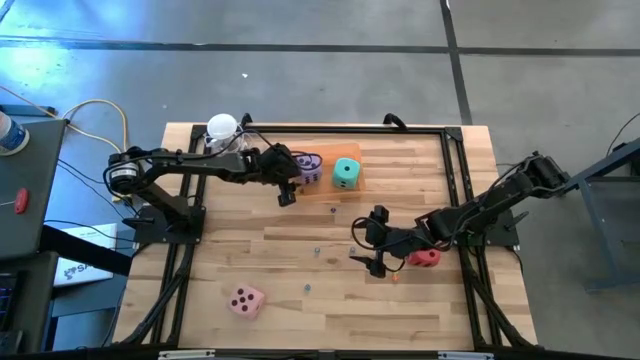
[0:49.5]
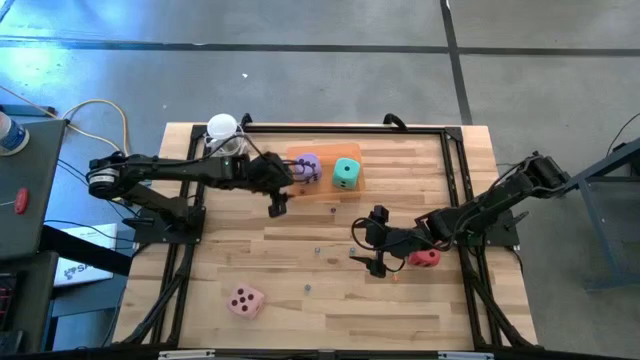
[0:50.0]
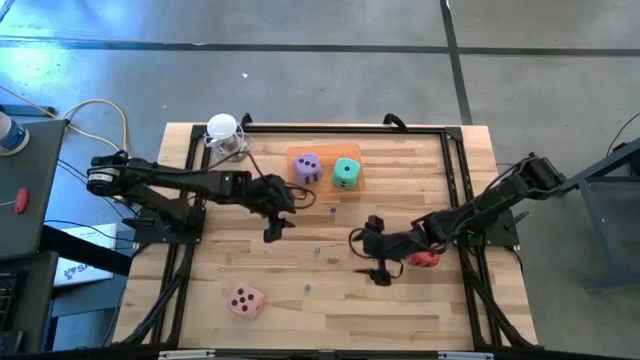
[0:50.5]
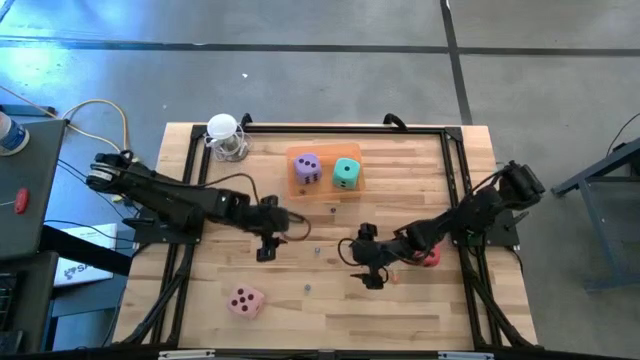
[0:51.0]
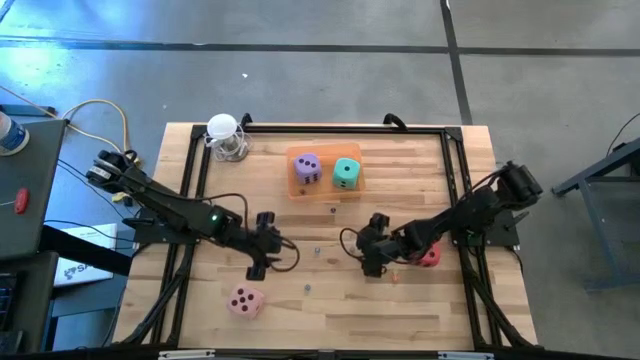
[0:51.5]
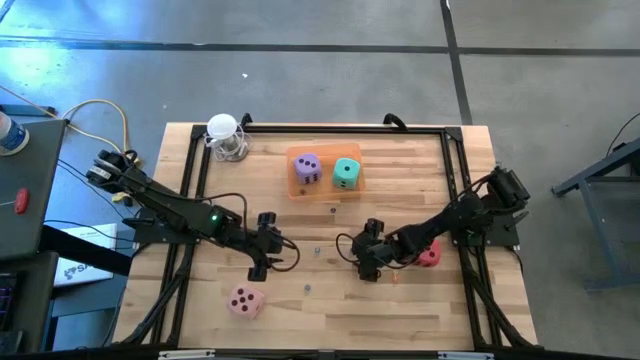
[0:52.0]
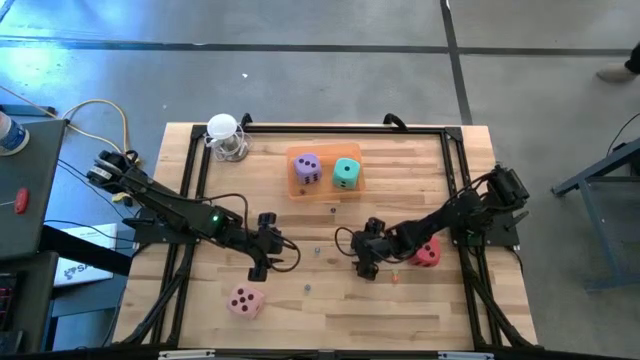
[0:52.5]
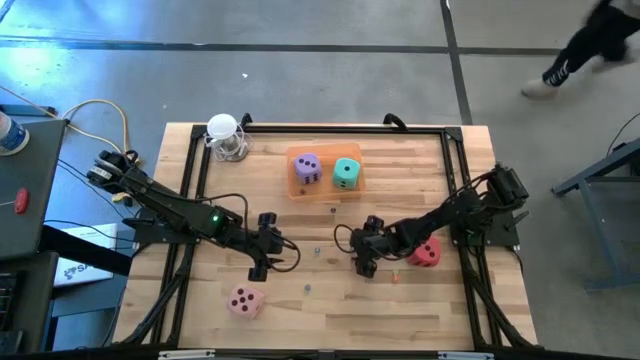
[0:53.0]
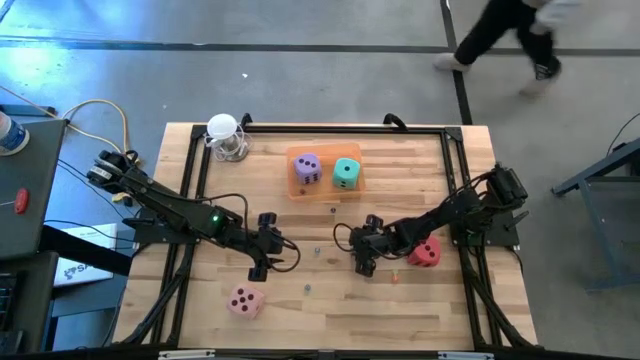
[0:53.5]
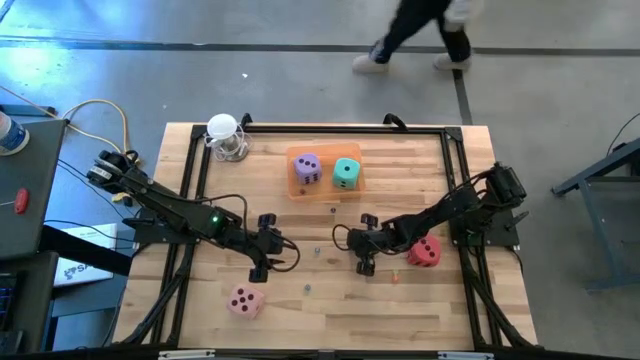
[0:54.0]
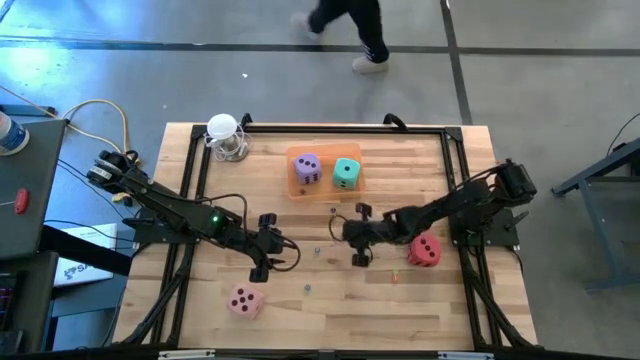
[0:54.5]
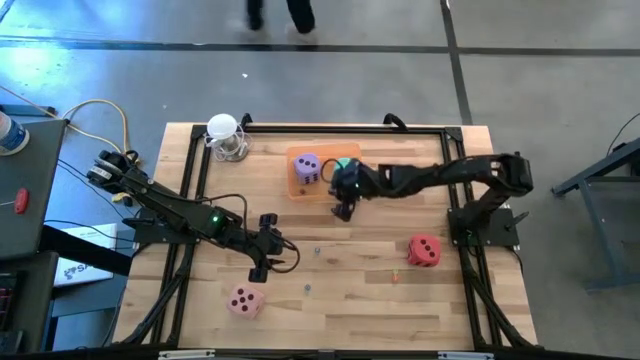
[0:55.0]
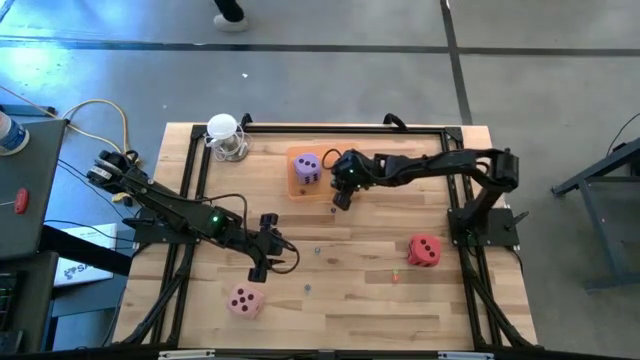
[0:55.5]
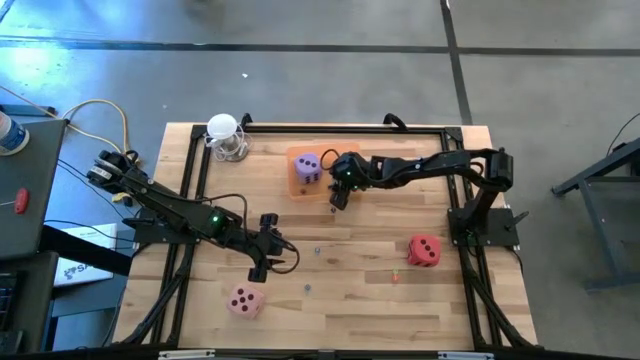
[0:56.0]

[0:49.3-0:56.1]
Task: Pick & Place Dice
Put the small light blue dice into the orange container

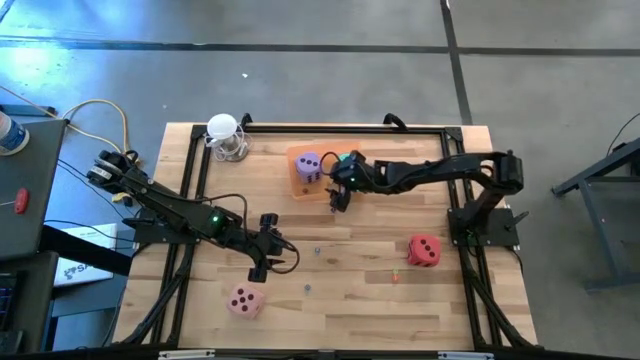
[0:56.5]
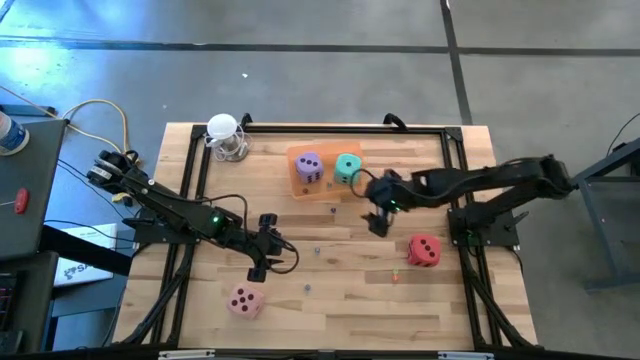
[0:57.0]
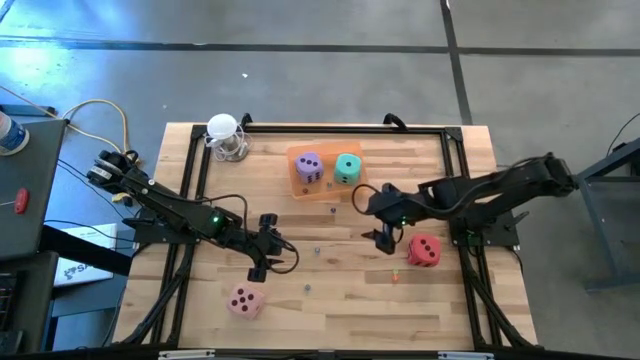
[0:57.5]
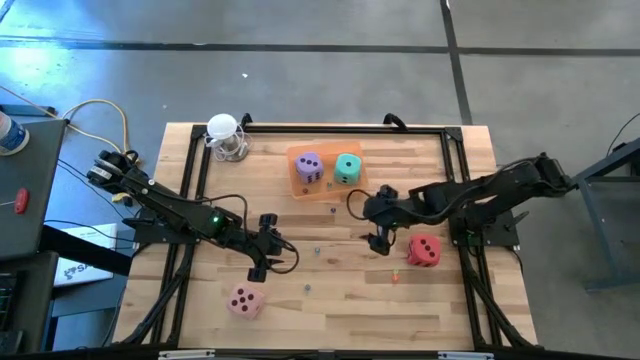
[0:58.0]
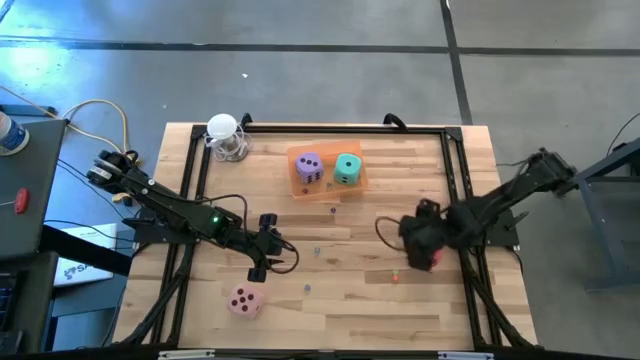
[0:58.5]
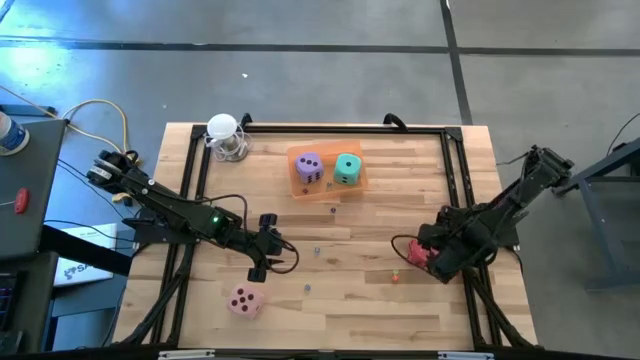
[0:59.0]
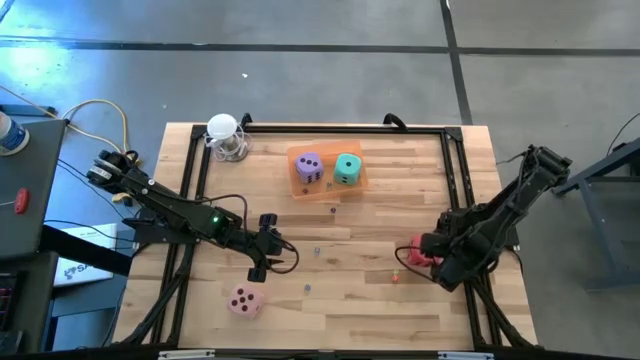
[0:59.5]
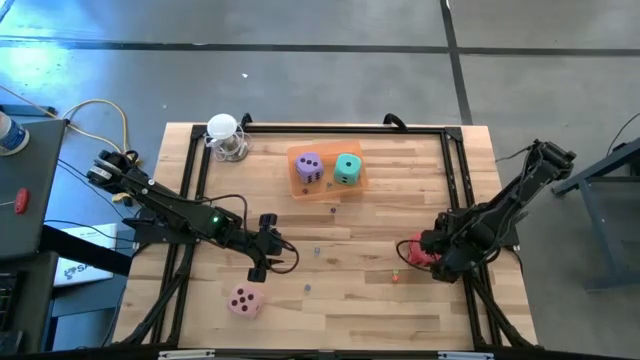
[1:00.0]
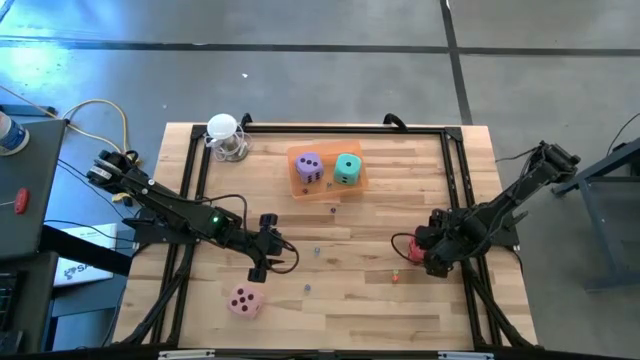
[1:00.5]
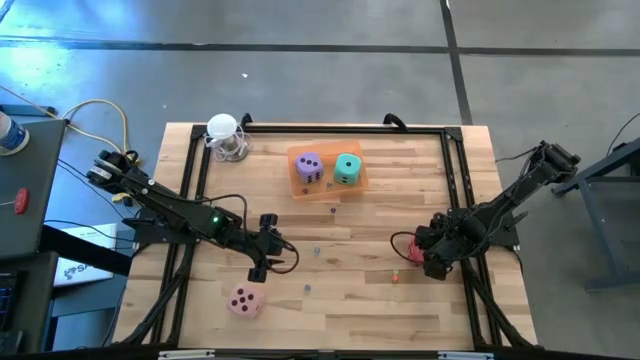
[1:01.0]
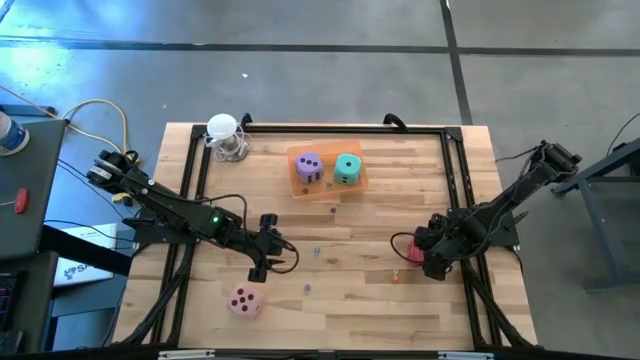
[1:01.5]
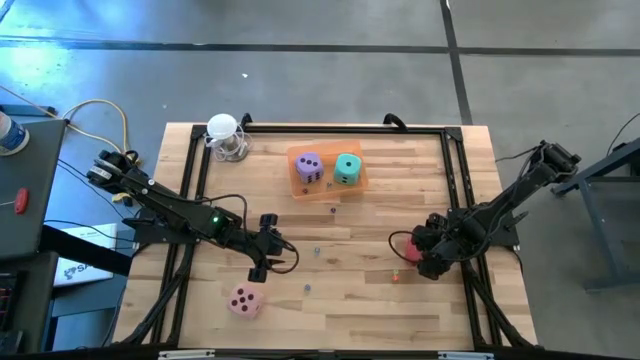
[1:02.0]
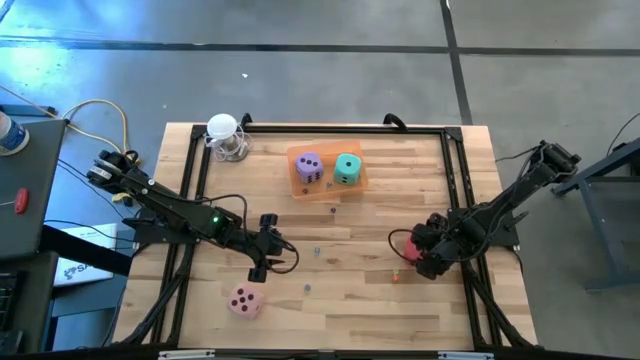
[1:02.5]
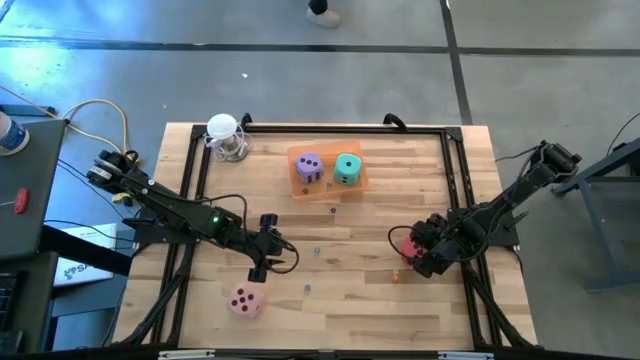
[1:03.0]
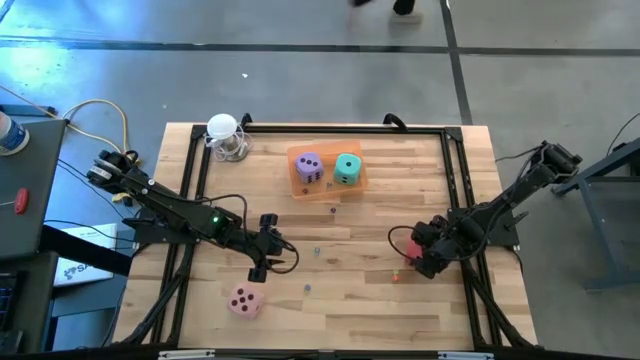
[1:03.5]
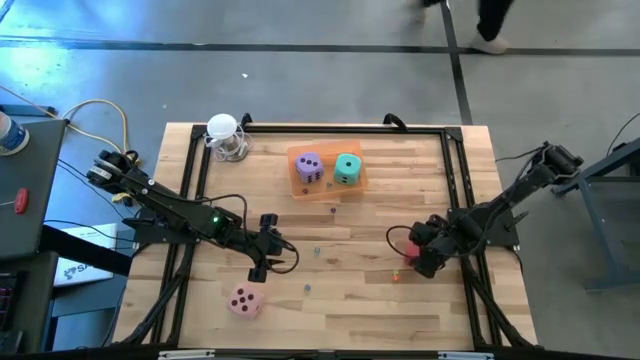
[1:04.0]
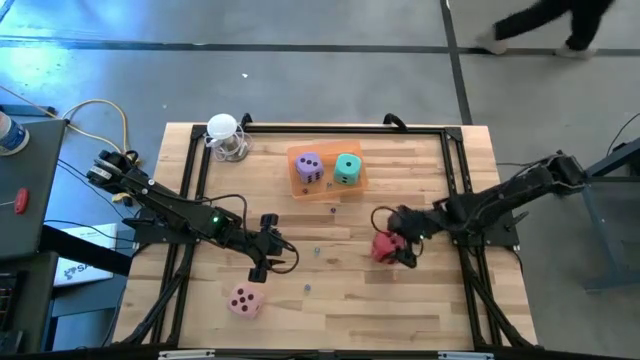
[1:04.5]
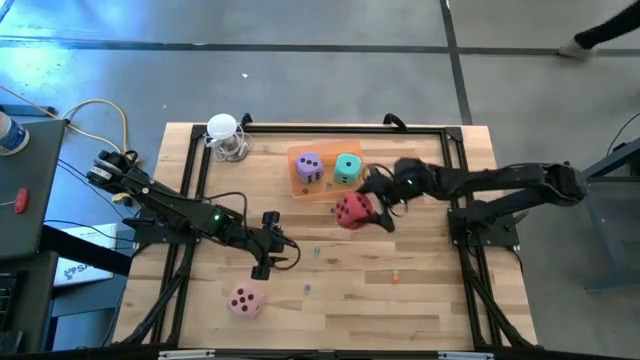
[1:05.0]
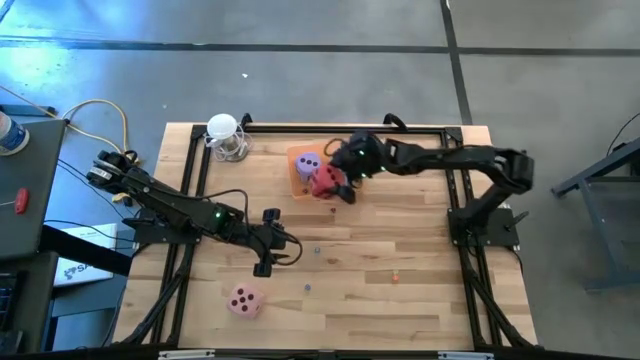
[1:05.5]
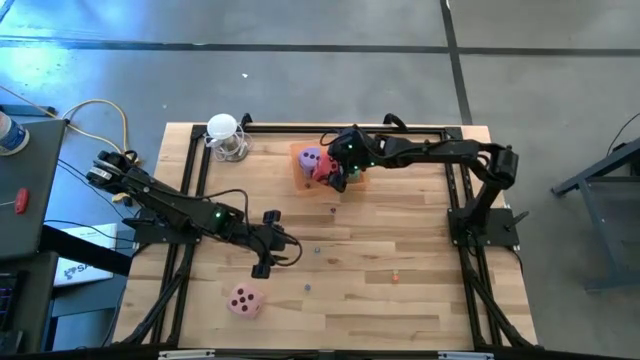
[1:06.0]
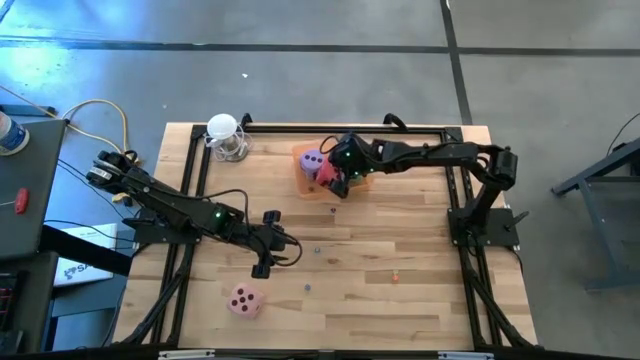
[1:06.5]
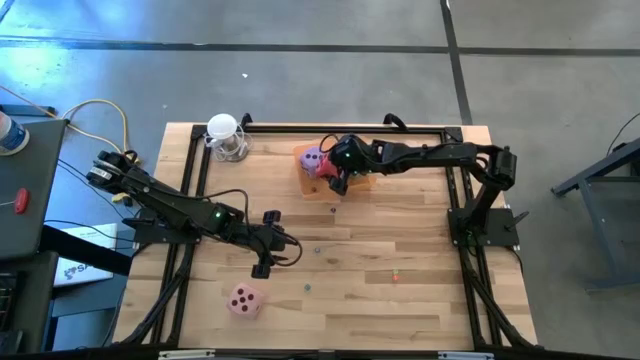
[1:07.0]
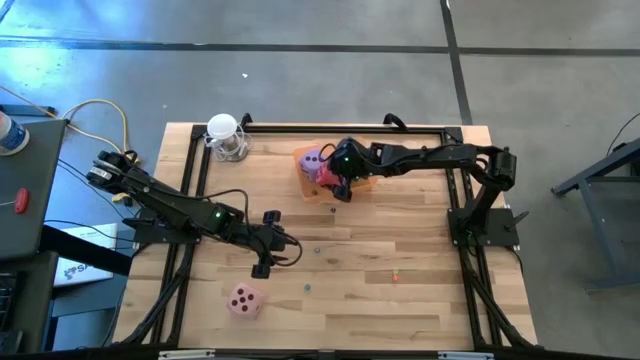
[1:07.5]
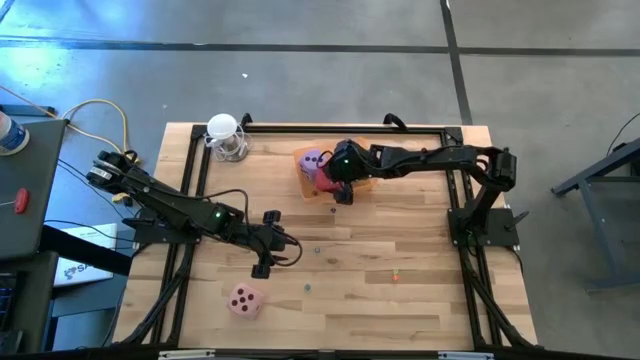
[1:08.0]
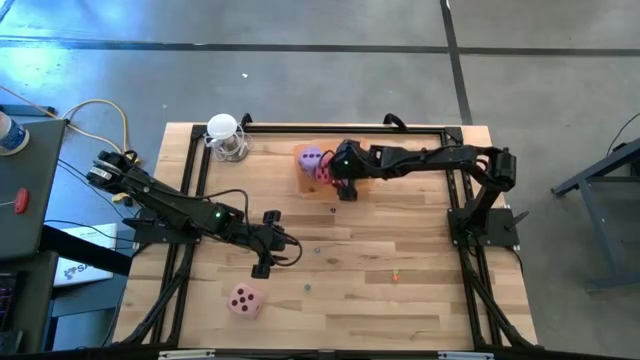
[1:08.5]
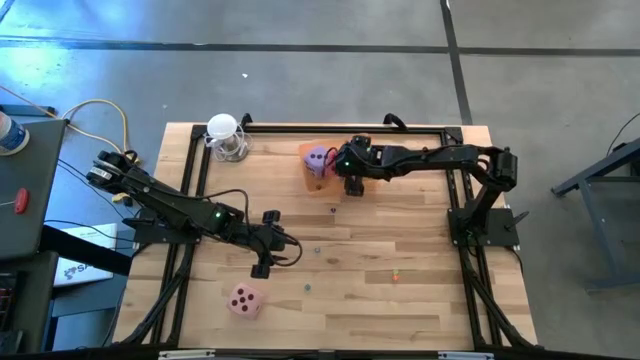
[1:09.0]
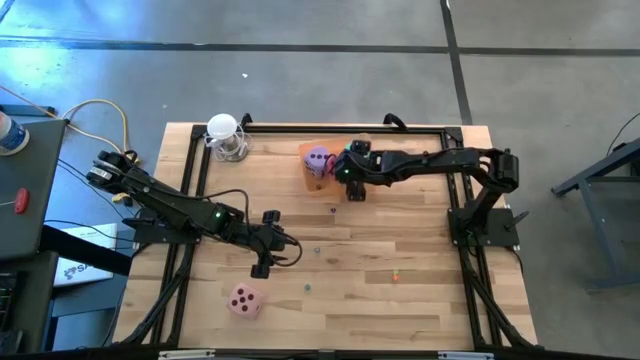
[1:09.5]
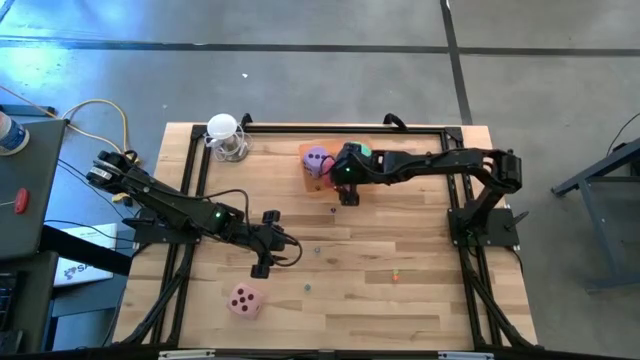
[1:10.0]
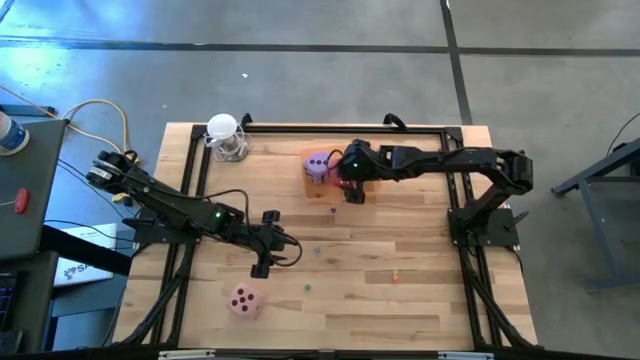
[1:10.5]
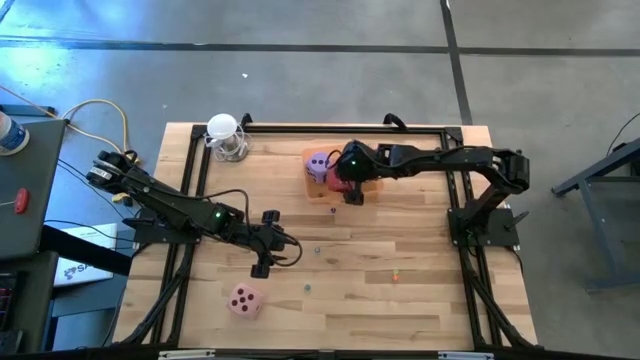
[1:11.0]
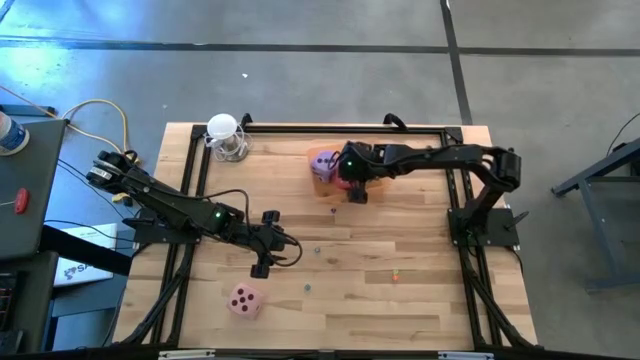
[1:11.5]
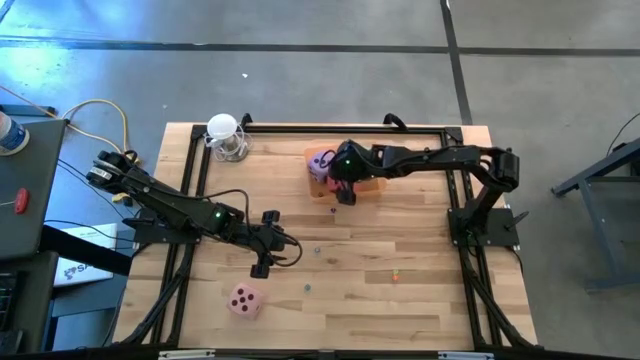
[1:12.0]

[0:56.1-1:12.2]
Put the large red dice into the orange container
